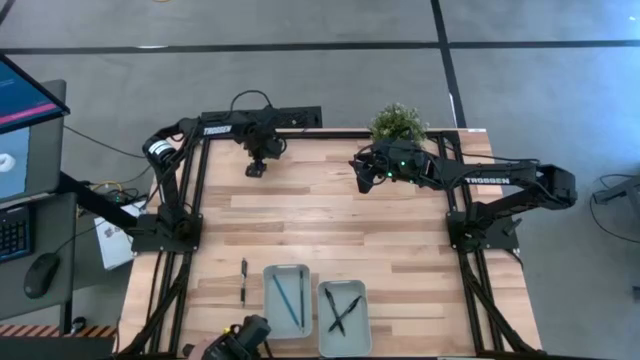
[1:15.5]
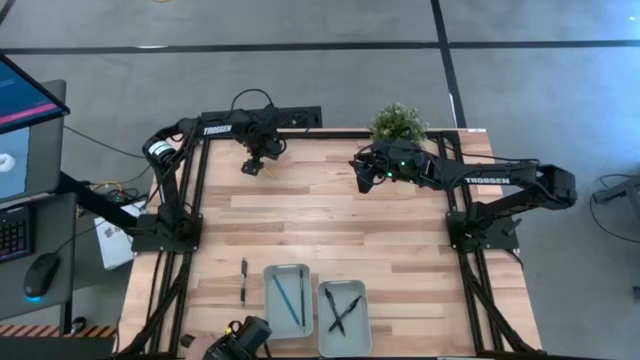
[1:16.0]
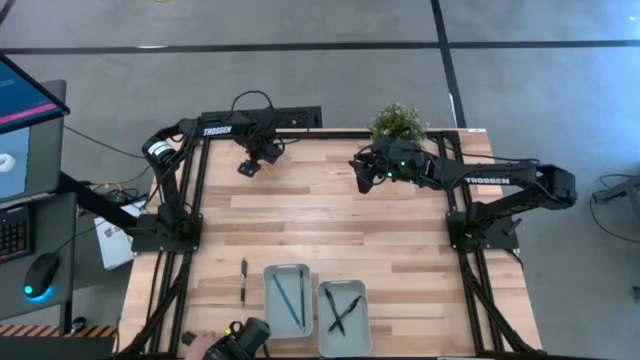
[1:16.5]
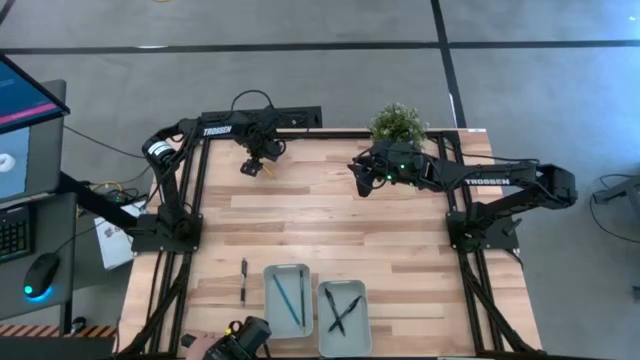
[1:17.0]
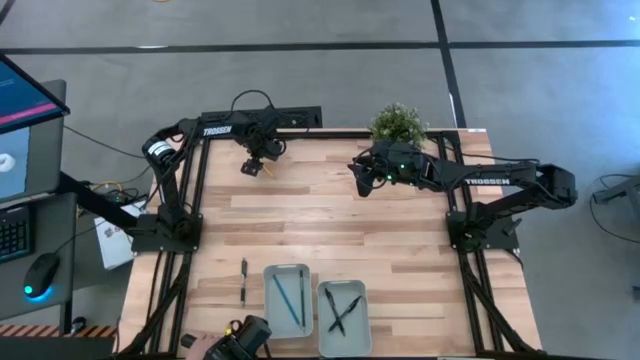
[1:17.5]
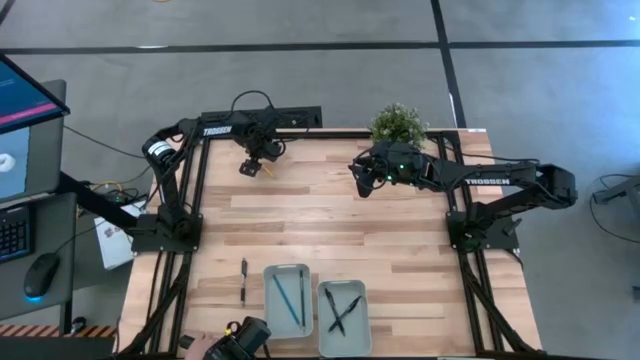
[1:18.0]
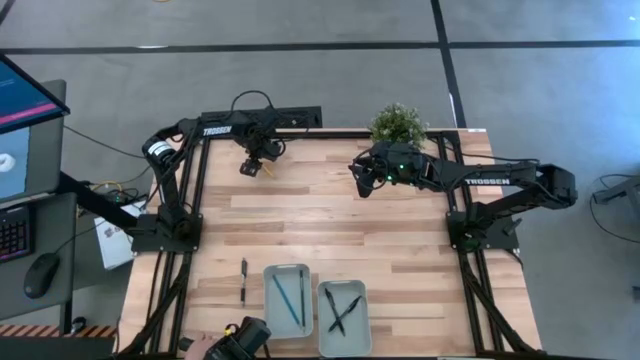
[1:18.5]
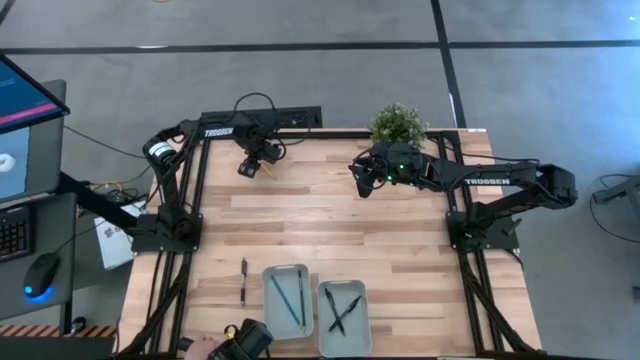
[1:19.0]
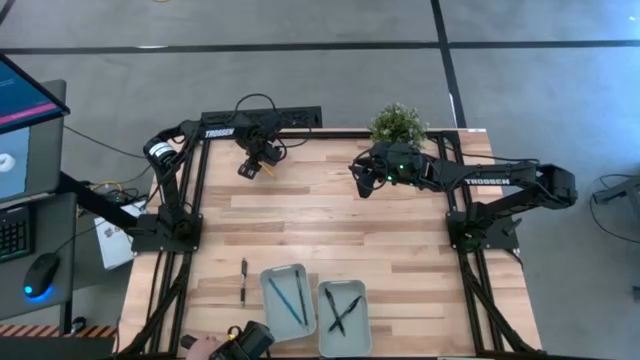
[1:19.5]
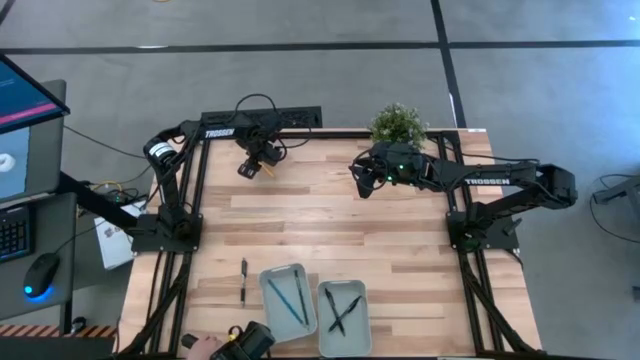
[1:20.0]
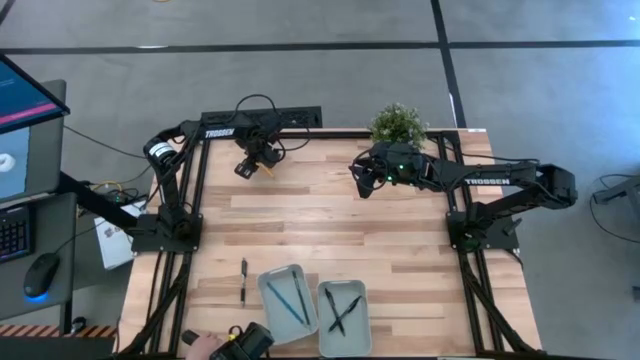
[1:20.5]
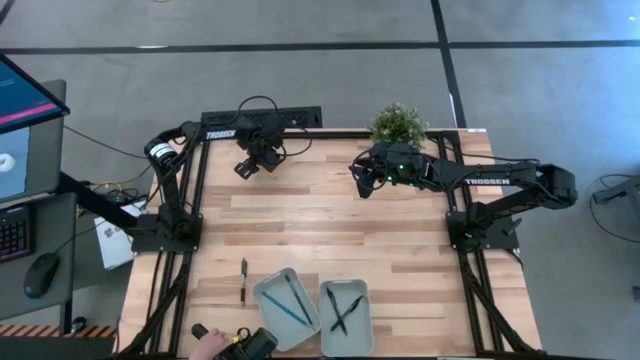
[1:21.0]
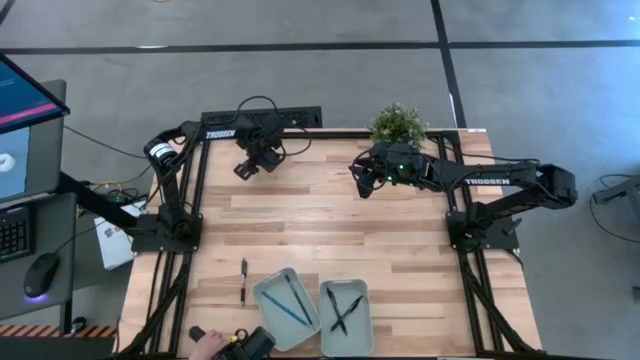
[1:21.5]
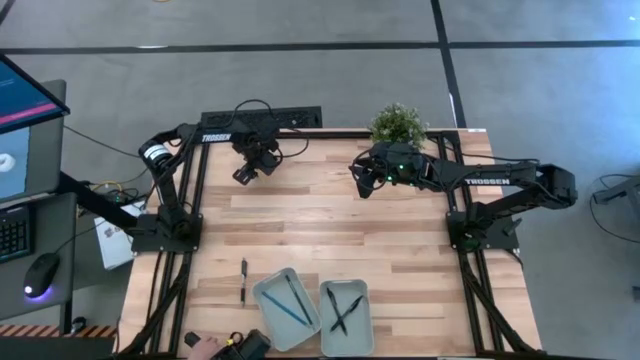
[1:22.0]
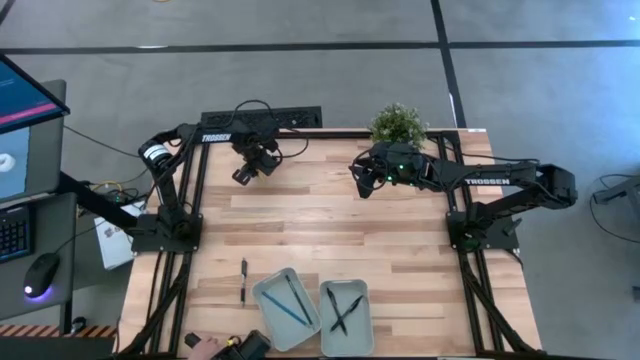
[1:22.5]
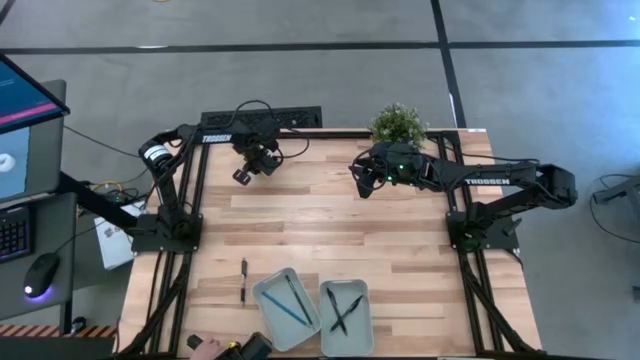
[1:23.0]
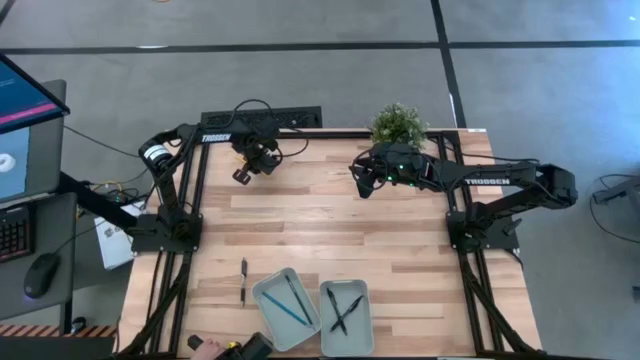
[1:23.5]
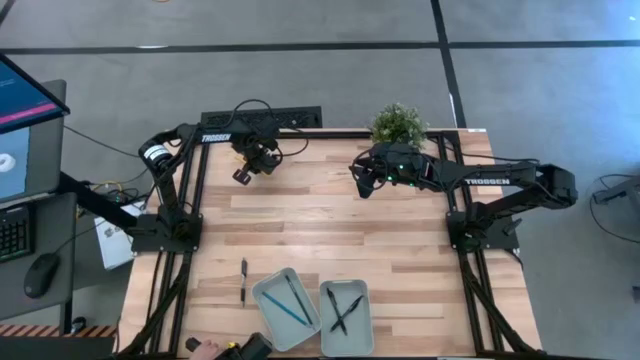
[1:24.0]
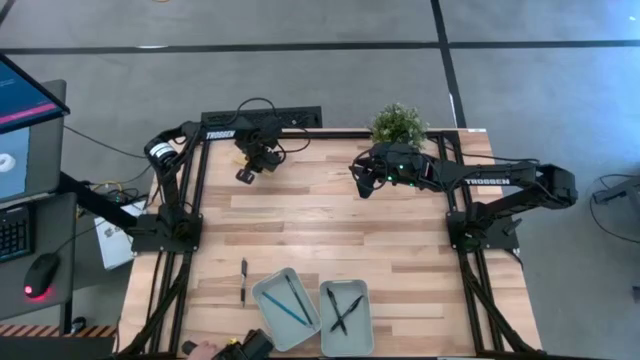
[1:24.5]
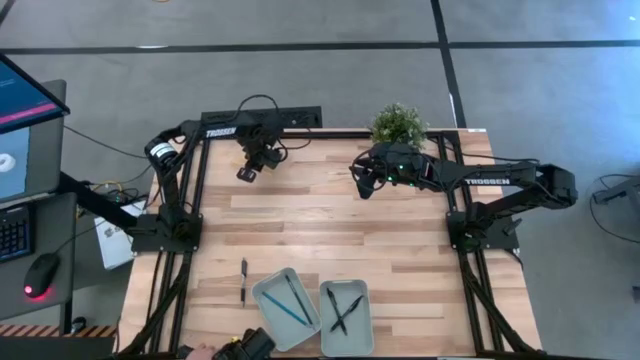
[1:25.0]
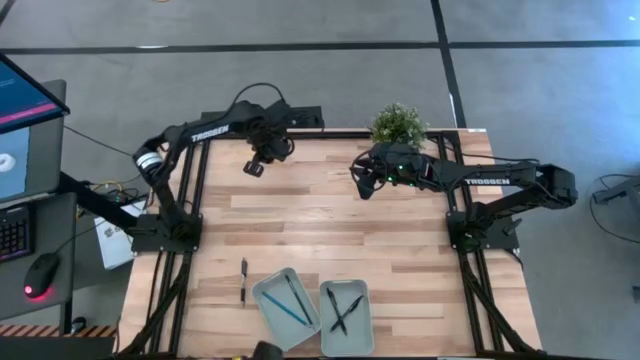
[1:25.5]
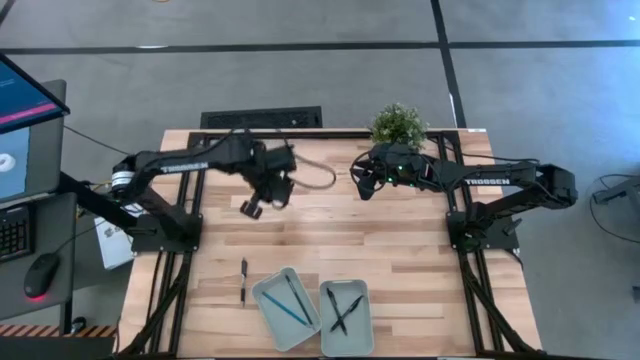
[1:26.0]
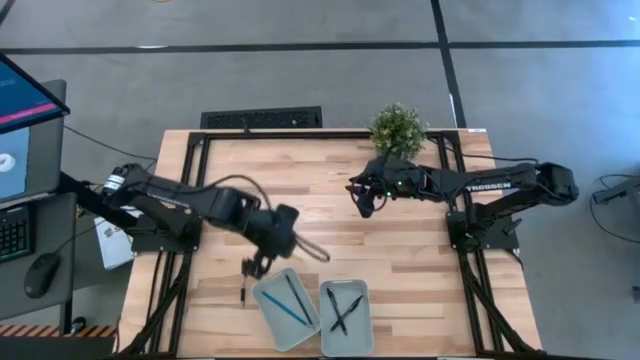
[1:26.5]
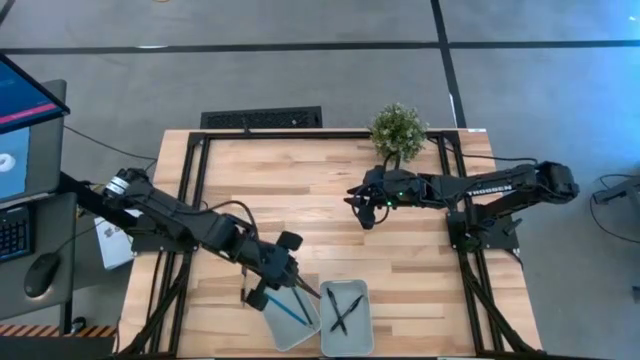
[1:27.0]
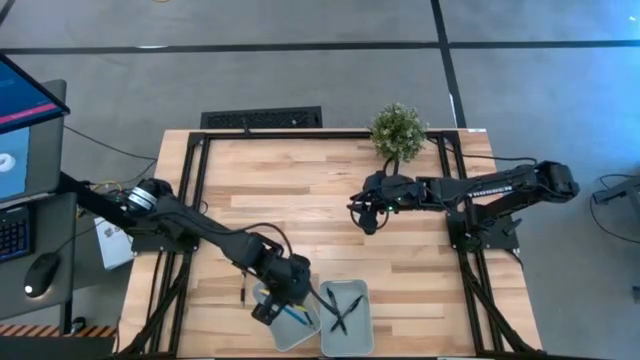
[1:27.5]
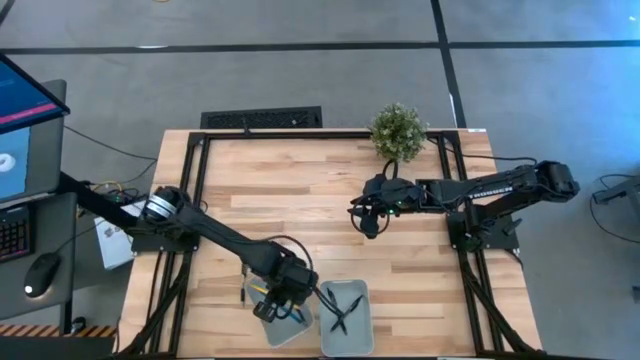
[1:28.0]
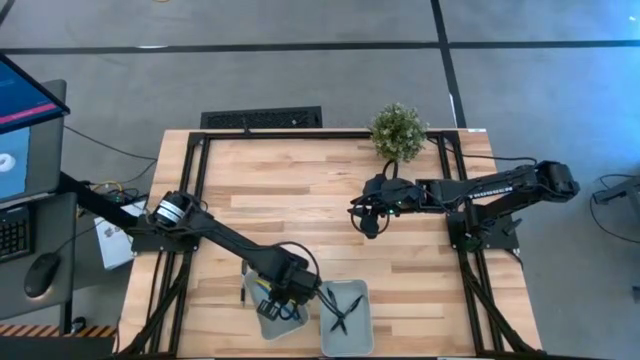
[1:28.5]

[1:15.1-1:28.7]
Task: Sort pens & pencils
Put the yellow pencil into the left gray bin

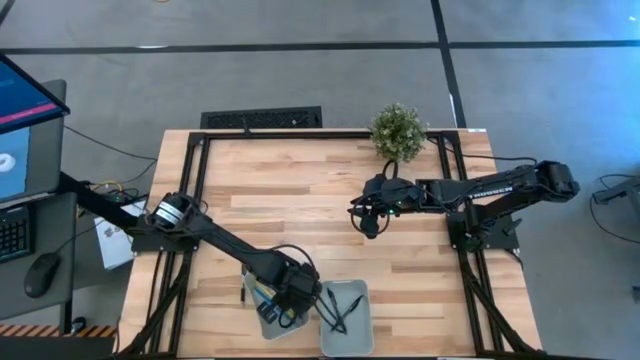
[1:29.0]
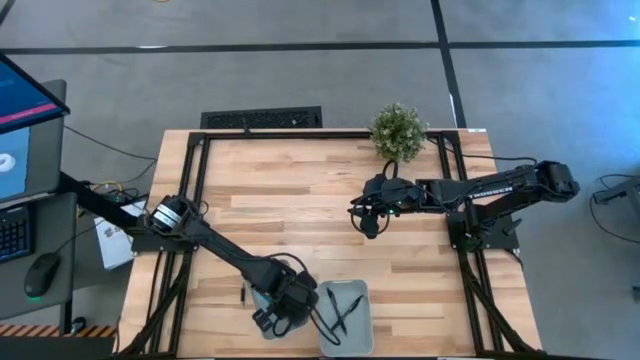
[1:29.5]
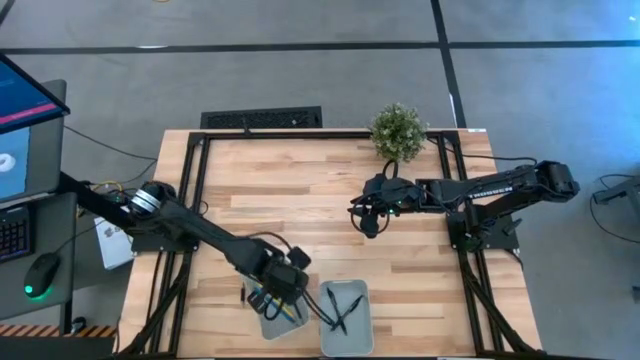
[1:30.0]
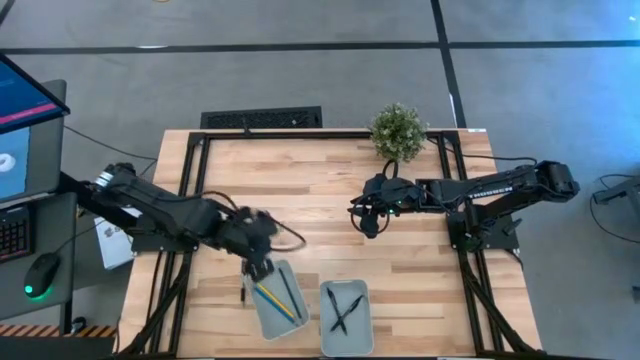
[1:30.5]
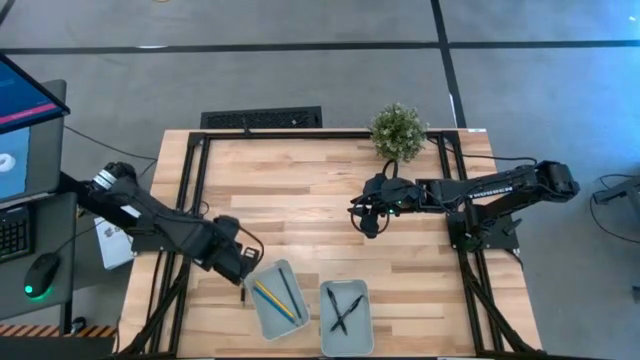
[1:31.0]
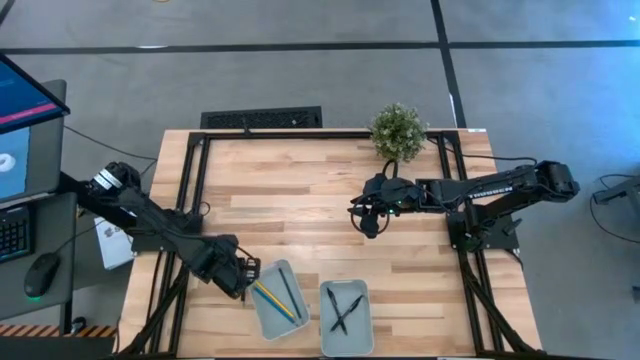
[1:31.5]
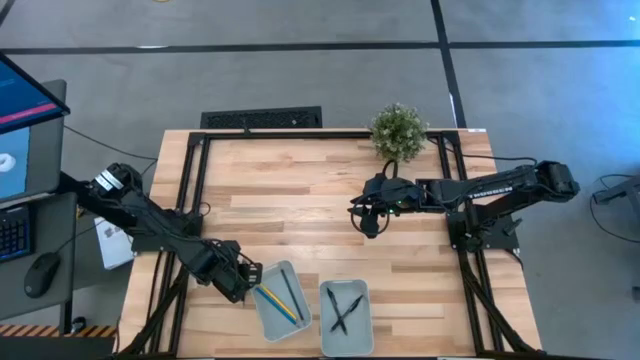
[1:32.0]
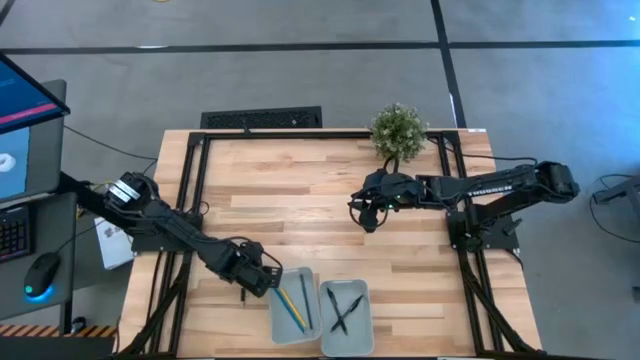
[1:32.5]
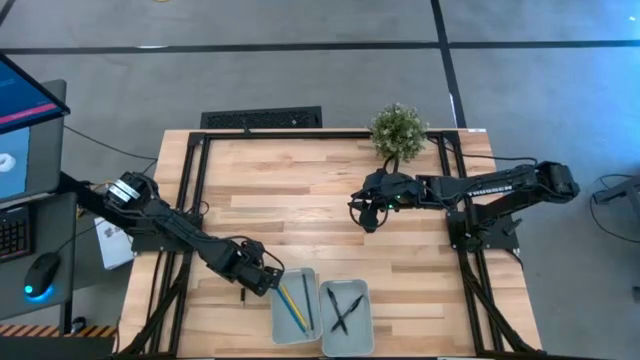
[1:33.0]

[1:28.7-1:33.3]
Adjust the left gray bin

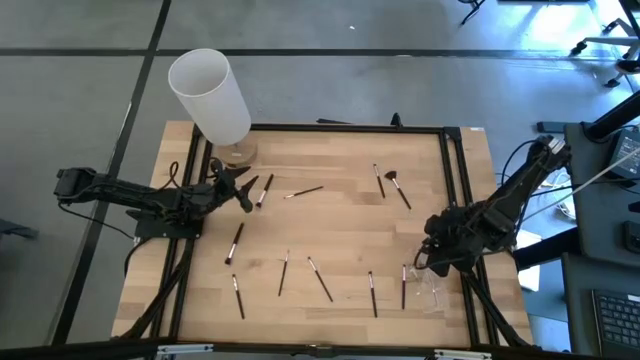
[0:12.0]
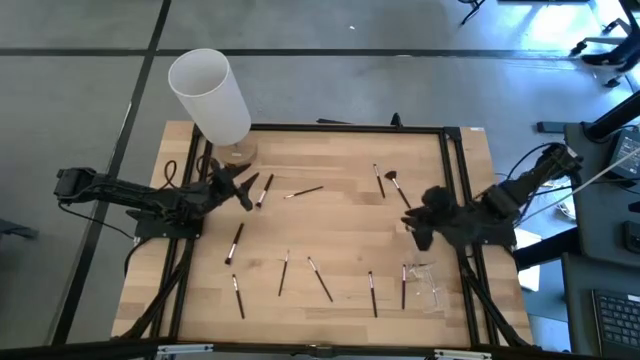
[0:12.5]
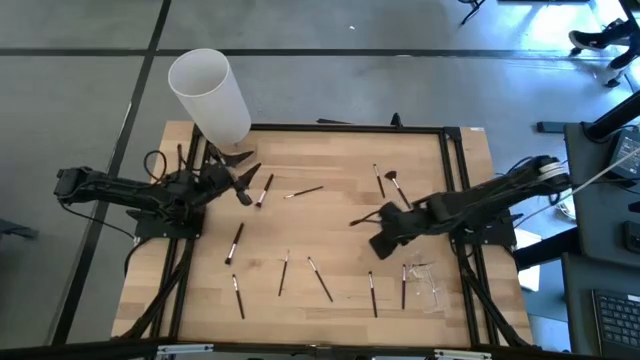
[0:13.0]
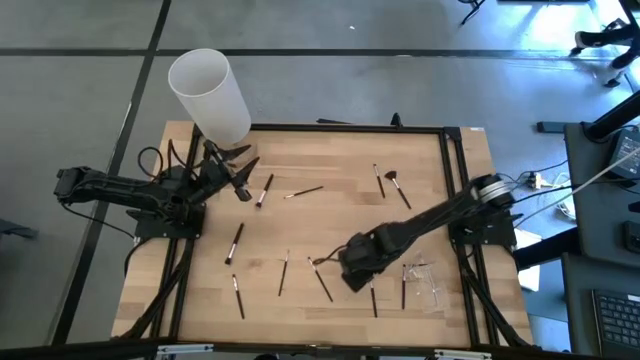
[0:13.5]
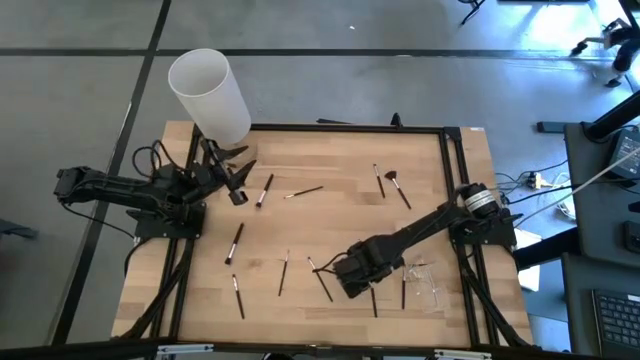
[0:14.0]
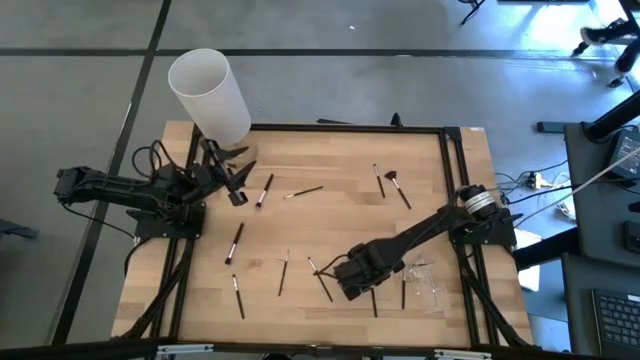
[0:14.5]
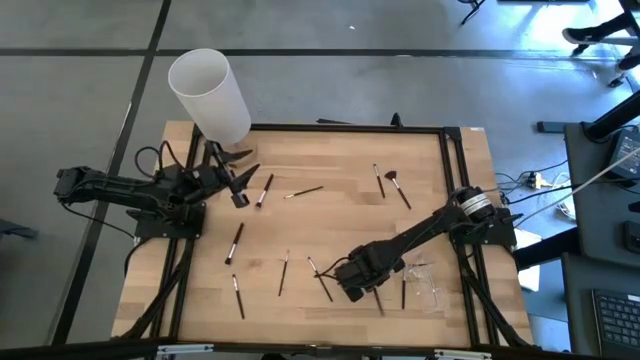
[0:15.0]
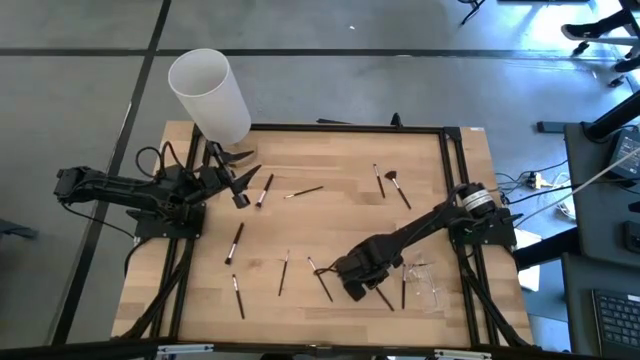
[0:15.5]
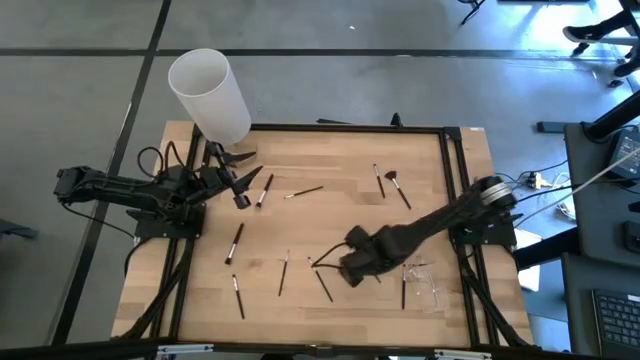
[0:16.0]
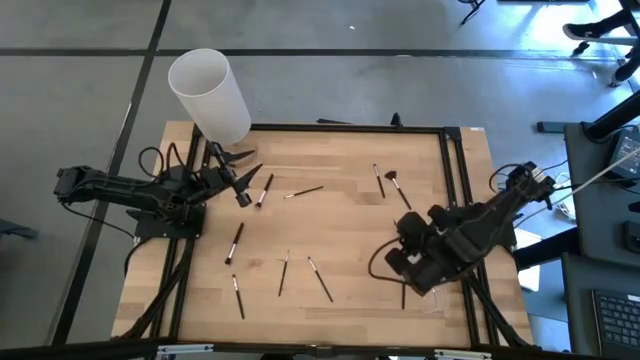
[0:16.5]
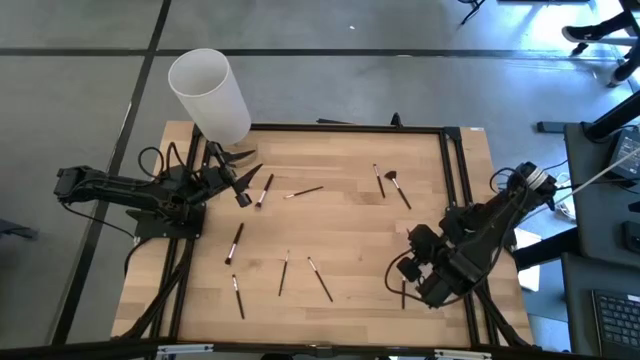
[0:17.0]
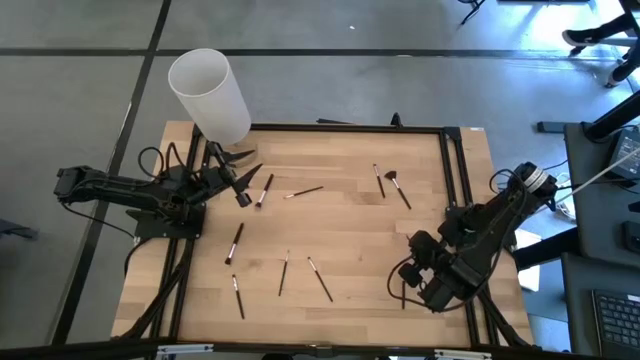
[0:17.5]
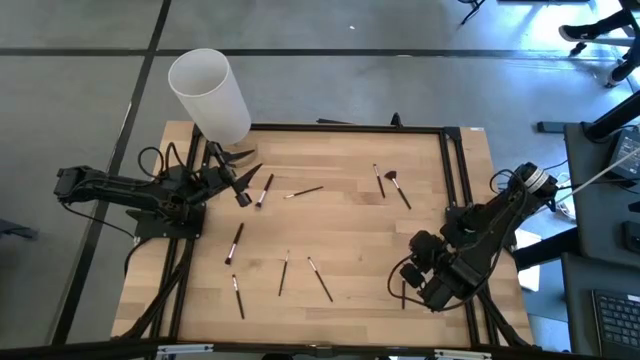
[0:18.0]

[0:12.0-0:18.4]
Task: Put items in baskets/containers
Put the black angled eyeshadow brush into the transparent organizer
